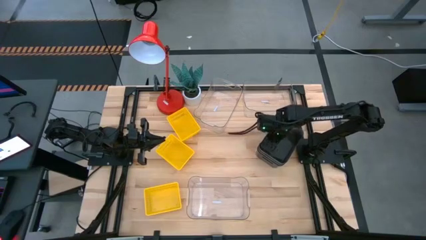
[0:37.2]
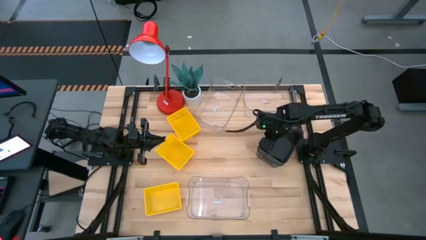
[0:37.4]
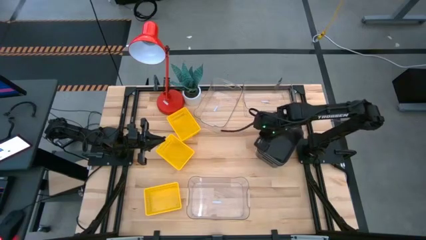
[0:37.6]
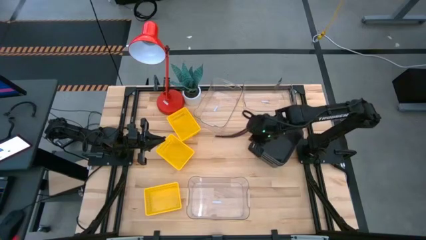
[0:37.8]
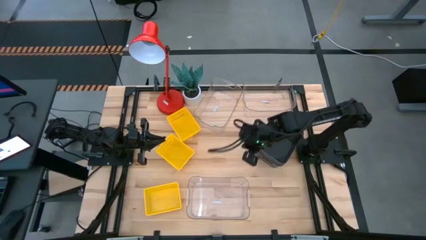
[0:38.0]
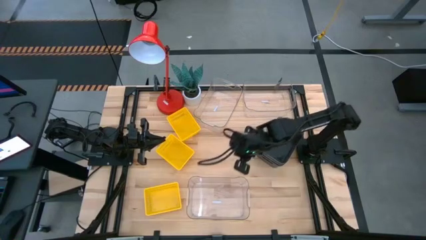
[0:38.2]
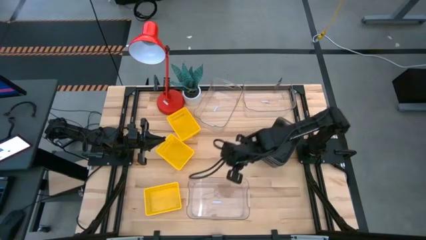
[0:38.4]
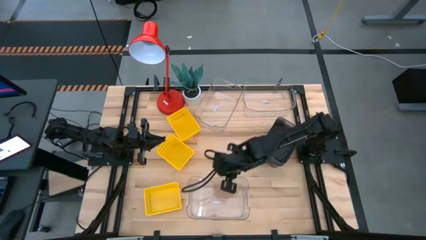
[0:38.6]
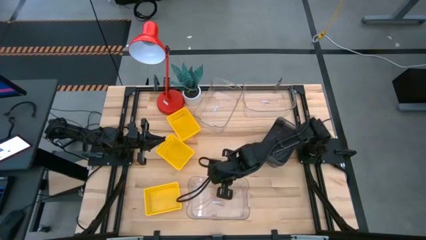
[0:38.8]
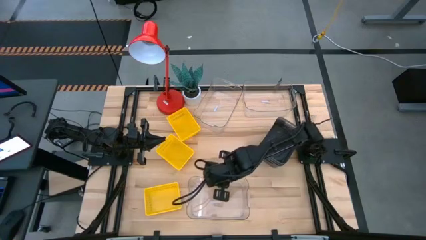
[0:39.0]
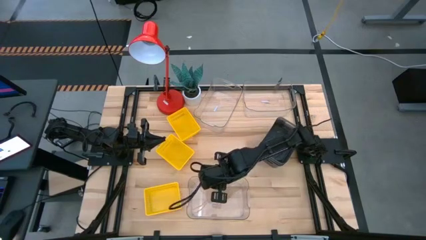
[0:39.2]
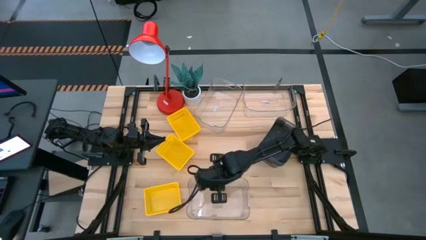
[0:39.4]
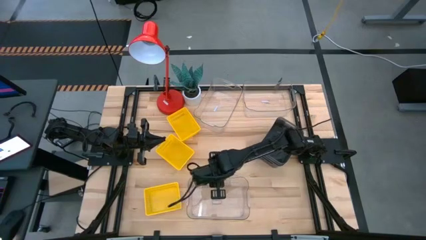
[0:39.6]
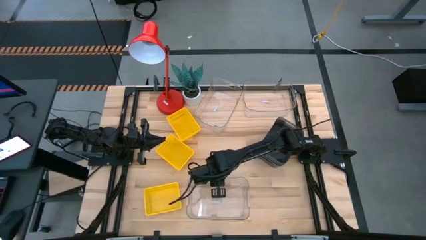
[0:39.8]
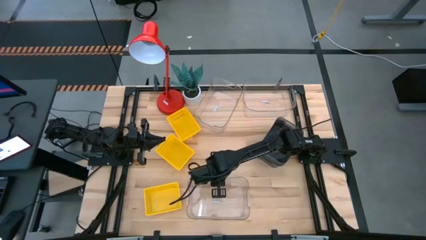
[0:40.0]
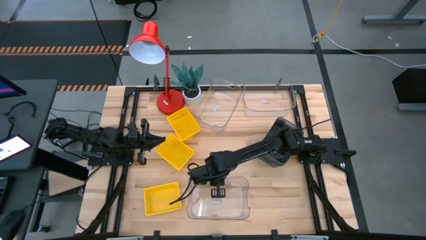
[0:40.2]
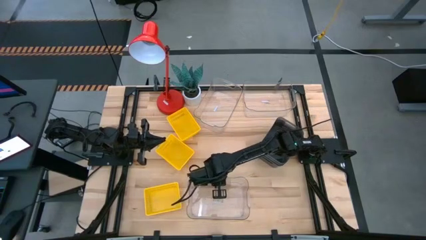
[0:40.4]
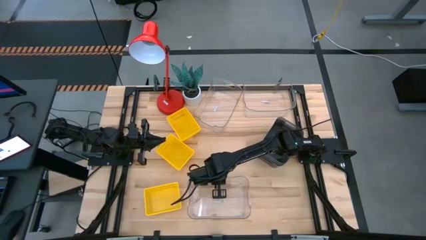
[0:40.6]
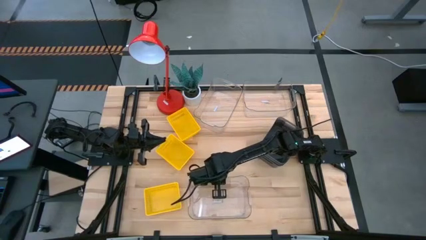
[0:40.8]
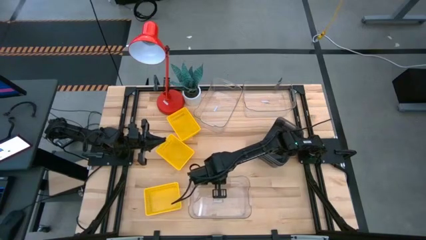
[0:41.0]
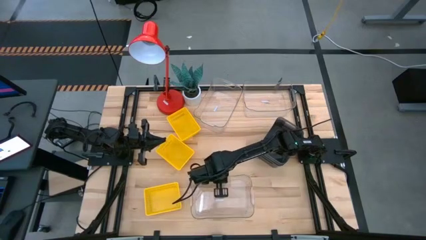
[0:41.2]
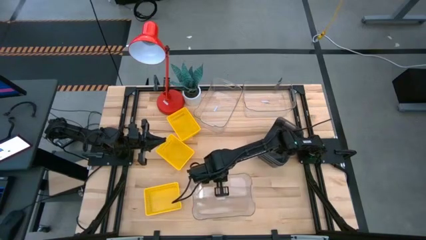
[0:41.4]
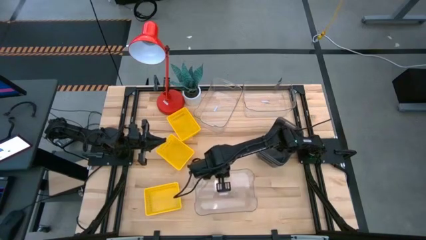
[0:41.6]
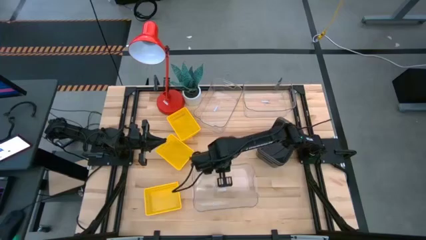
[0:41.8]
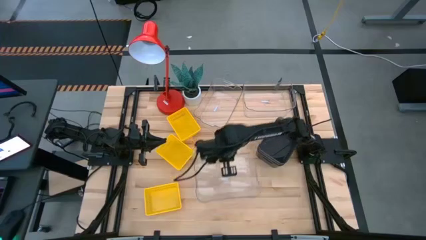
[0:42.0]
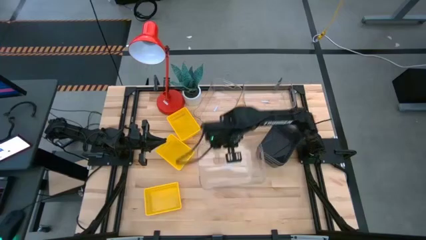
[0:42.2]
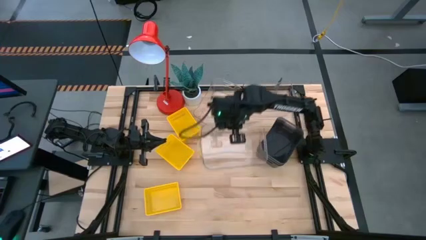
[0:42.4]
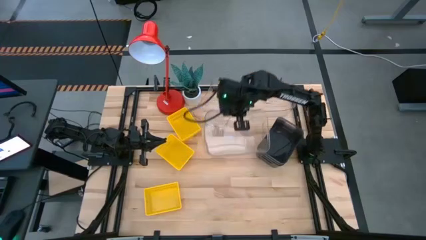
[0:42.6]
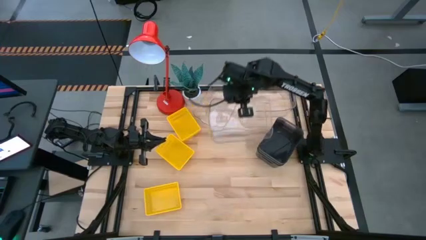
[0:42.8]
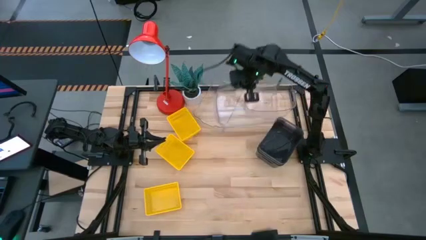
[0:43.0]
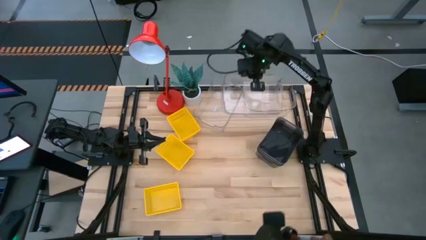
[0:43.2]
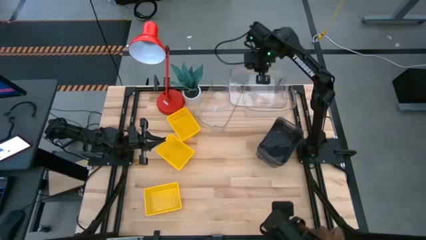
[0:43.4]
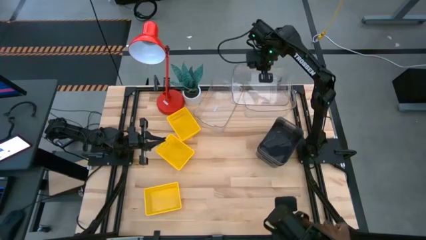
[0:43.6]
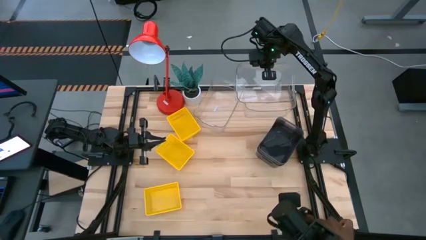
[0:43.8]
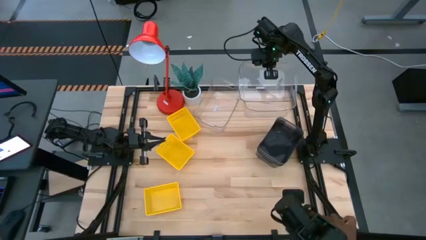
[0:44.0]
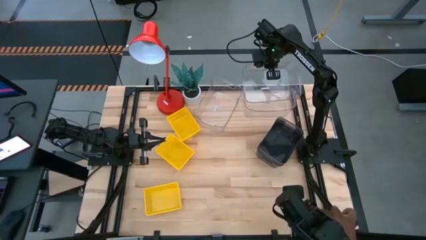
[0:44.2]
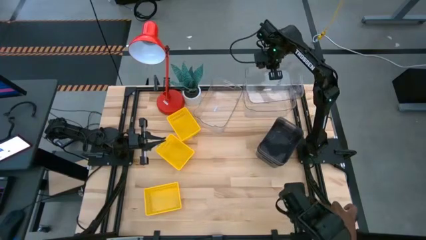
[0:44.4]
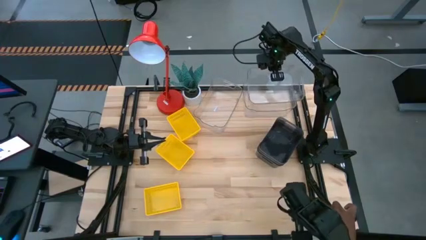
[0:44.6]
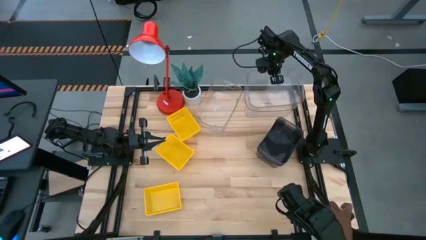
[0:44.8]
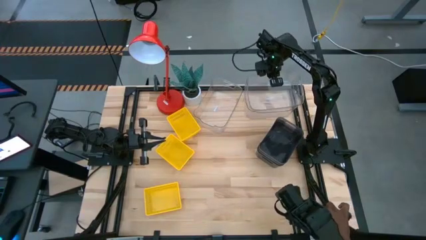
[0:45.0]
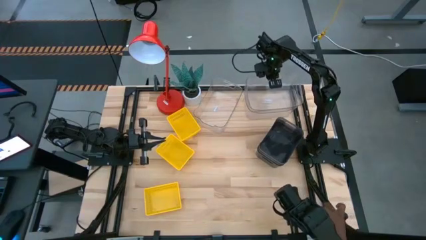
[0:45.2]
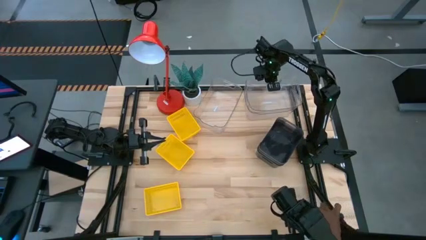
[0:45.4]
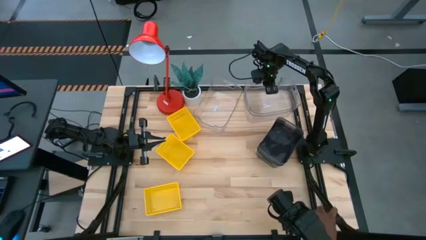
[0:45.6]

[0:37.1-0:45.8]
Stack the bottom transparent bin on the top right transparent bin

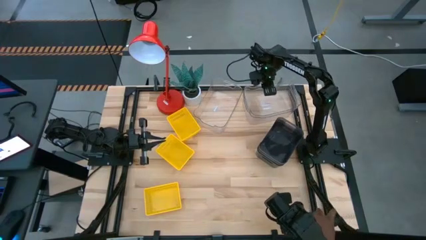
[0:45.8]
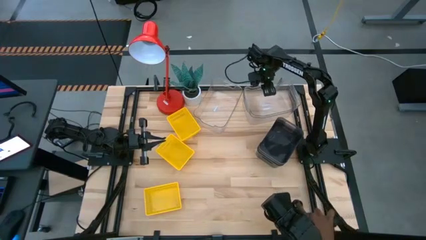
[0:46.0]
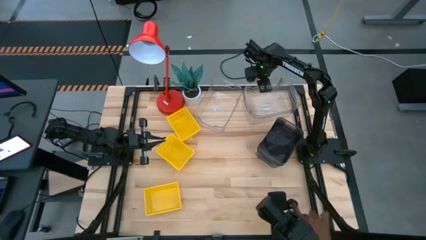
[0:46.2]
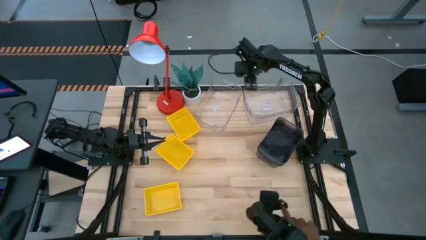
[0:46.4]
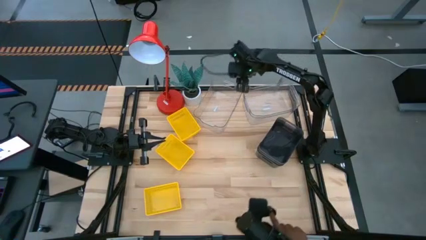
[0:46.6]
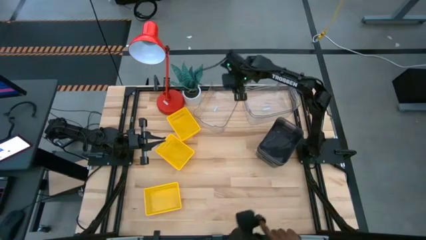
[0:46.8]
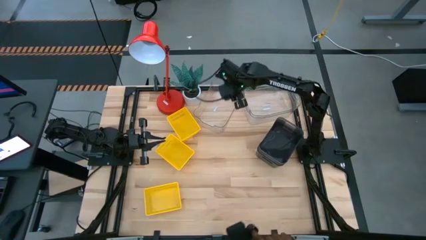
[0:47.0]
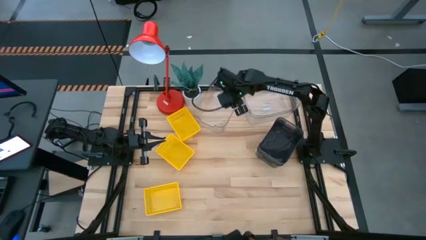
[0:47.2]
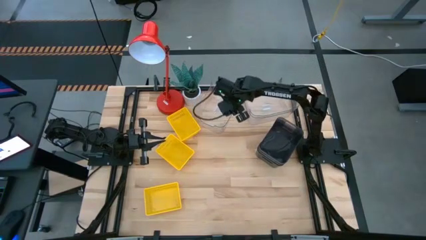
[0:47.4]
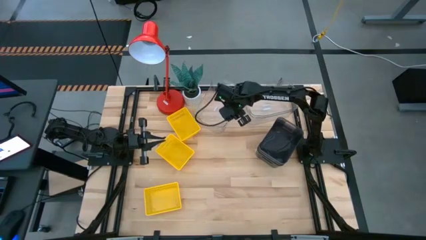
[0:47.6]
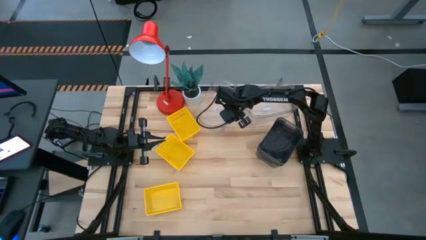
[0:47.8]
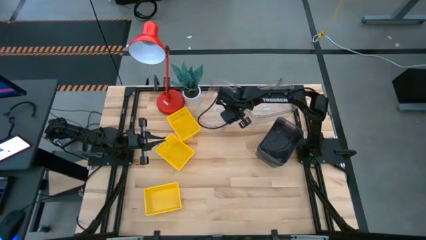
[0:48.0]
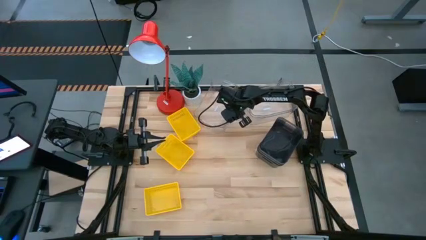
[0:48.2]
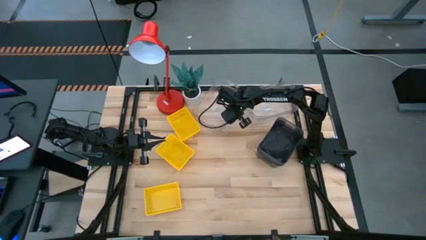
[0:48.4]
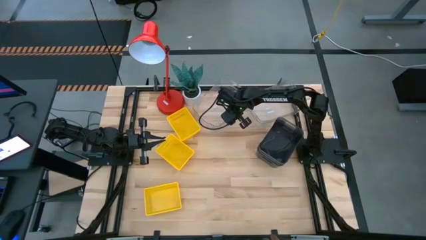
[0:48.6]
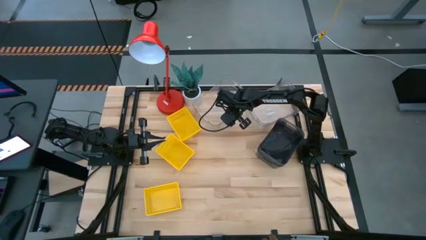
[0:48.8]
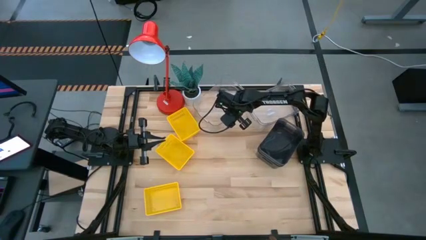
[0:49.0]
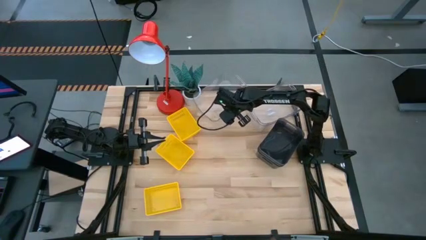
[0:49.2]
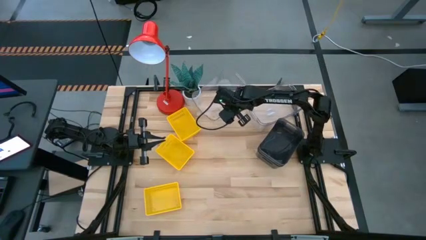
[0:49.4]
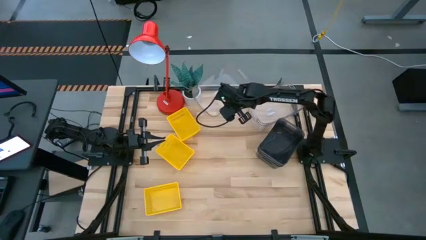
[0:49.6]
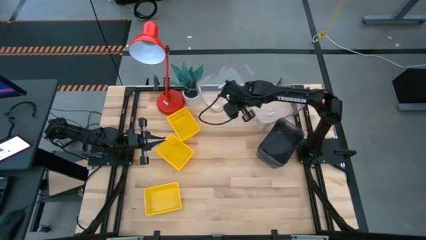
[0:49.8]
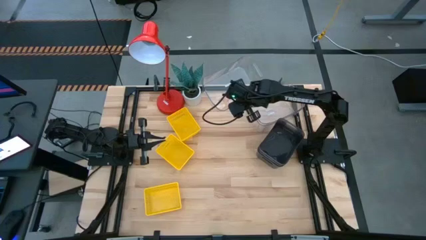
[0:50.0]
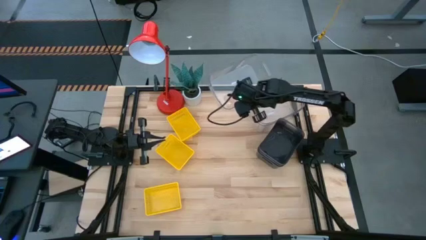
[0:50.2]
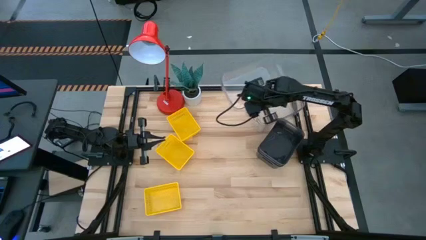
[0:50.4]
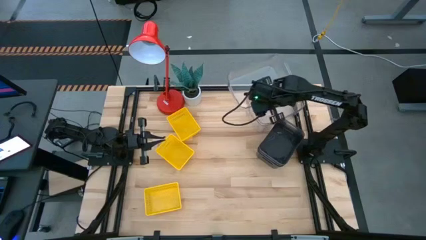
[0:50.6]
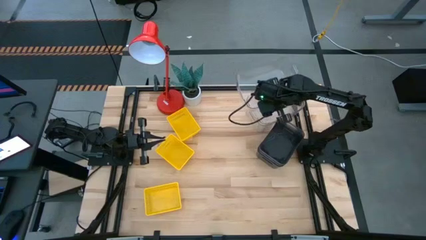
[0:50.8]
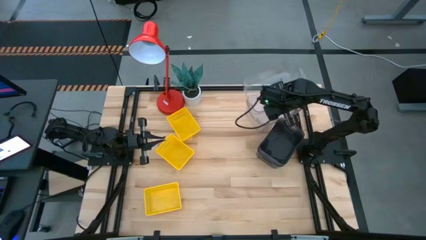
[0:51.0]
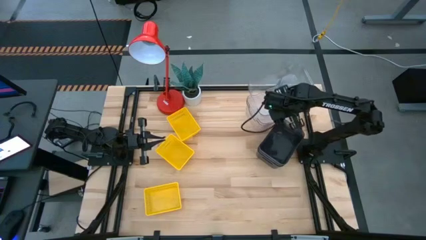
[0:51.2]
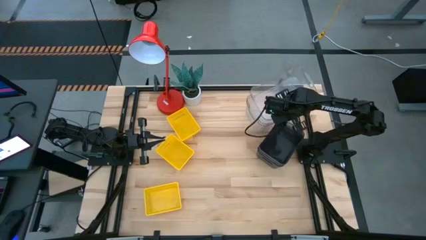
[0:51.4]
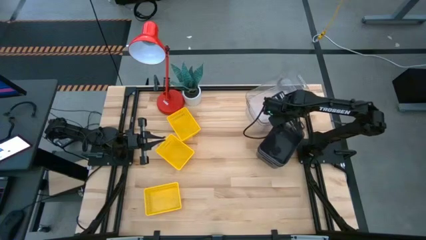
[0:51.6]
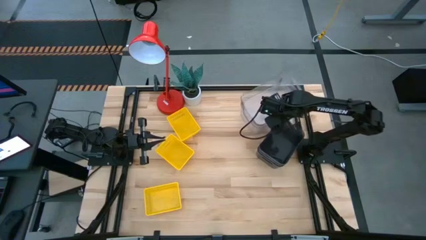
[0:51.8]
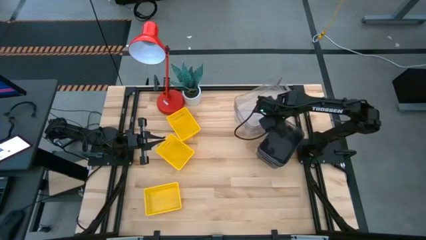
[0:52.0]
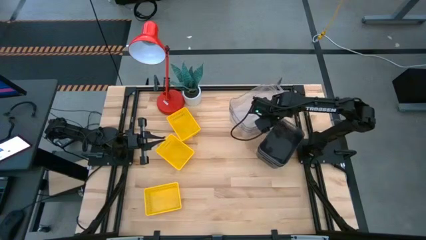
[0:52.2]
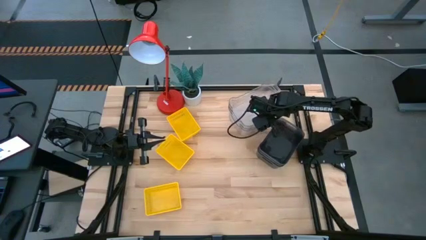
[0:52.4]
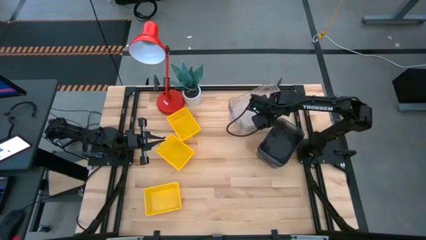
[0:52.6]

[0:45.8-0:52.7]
Stack the left transparent bin on the stacked transparent bins
